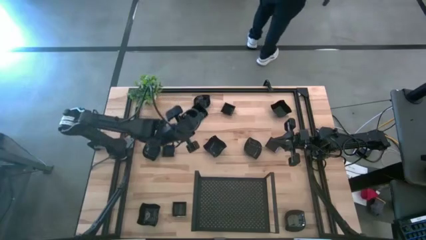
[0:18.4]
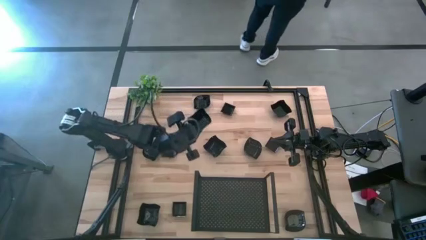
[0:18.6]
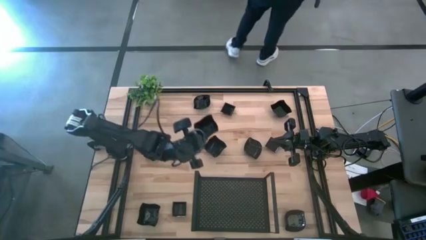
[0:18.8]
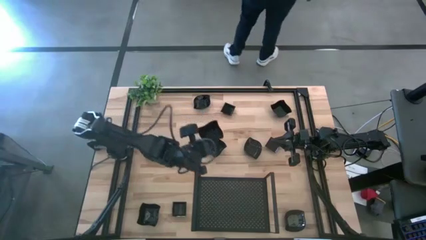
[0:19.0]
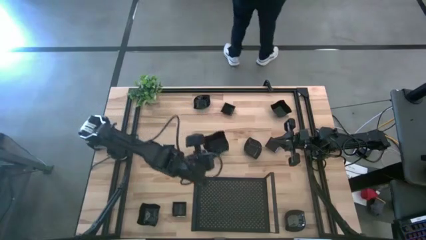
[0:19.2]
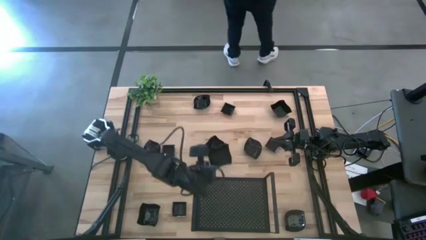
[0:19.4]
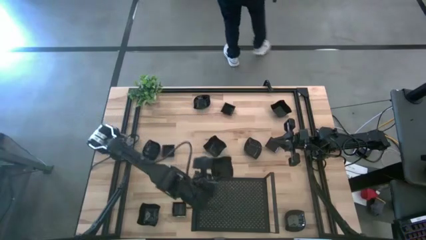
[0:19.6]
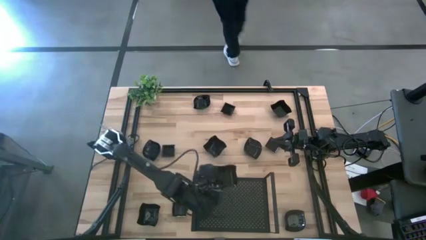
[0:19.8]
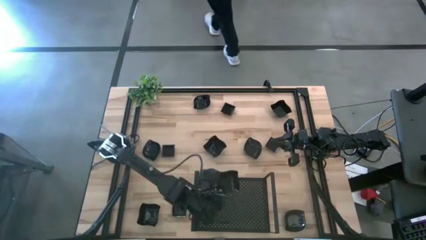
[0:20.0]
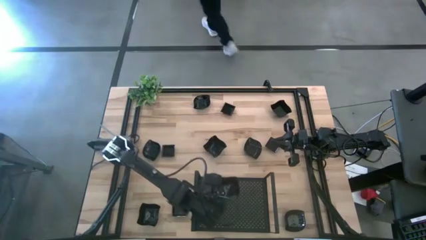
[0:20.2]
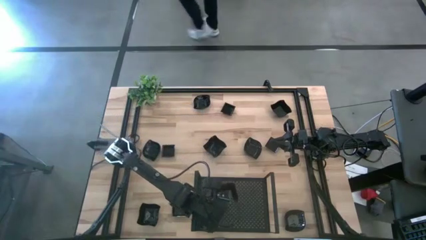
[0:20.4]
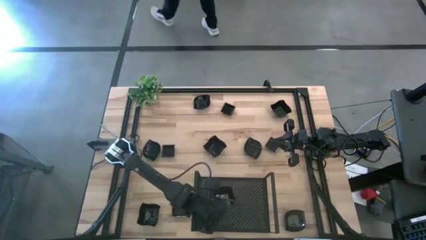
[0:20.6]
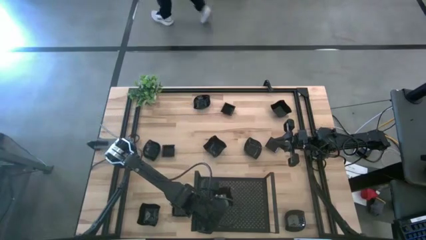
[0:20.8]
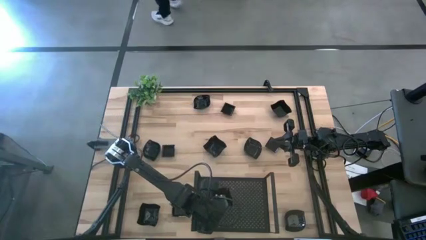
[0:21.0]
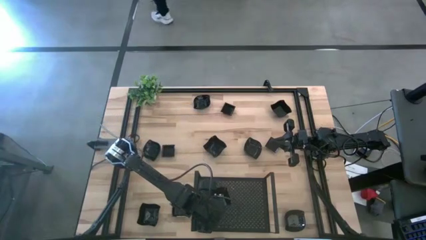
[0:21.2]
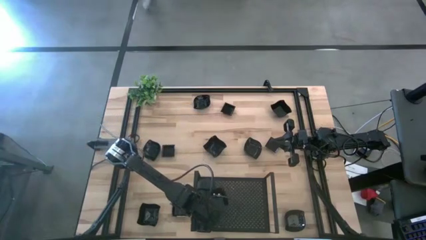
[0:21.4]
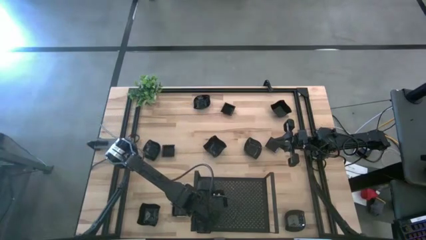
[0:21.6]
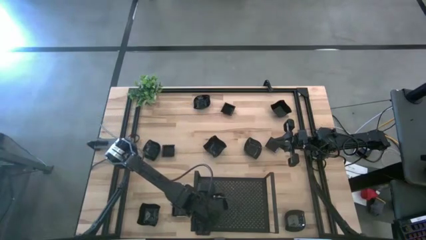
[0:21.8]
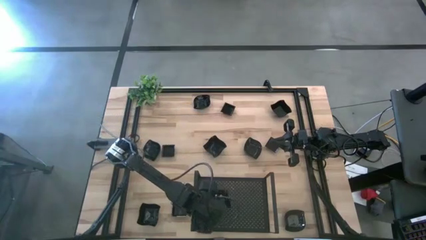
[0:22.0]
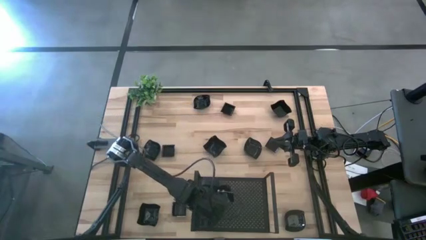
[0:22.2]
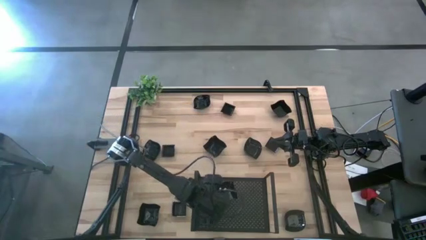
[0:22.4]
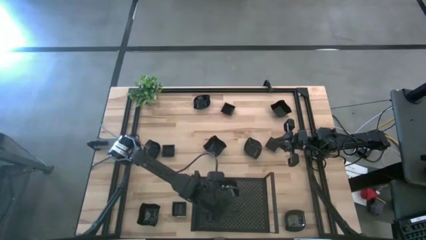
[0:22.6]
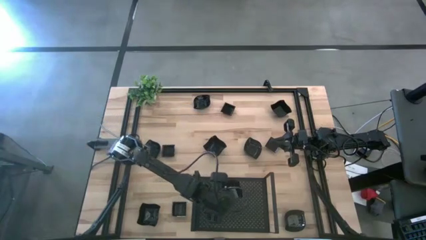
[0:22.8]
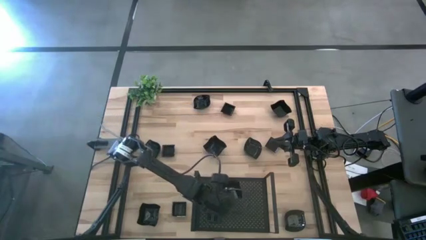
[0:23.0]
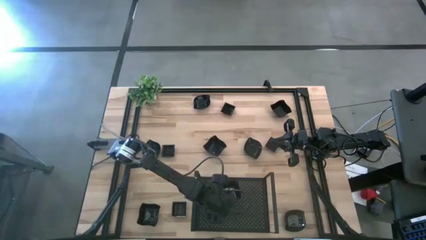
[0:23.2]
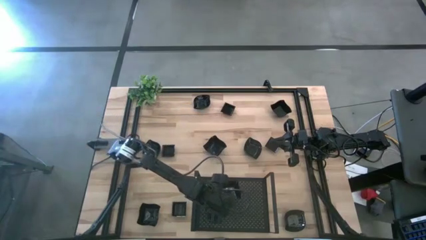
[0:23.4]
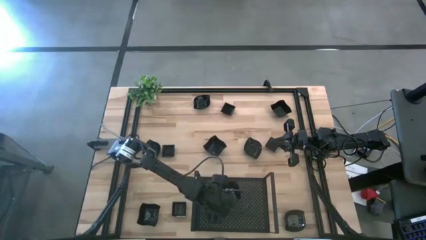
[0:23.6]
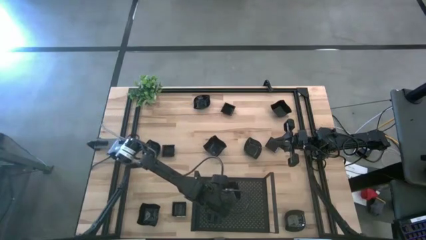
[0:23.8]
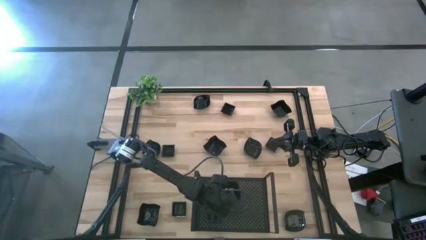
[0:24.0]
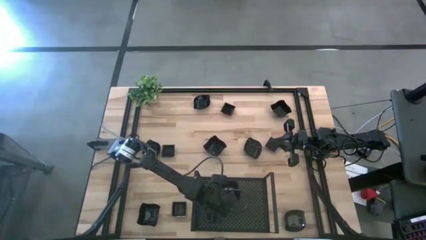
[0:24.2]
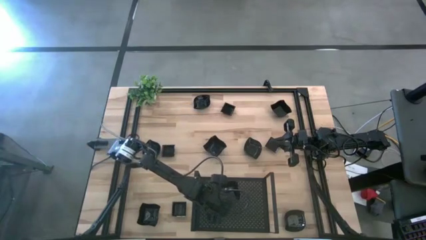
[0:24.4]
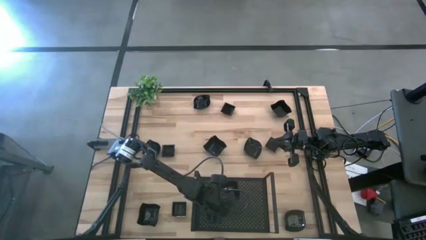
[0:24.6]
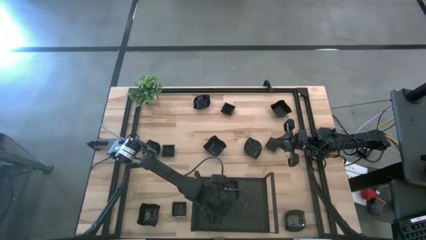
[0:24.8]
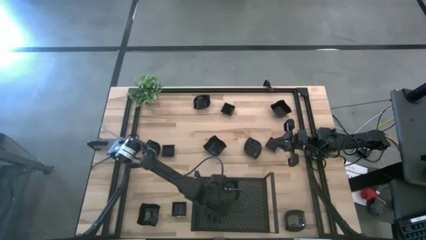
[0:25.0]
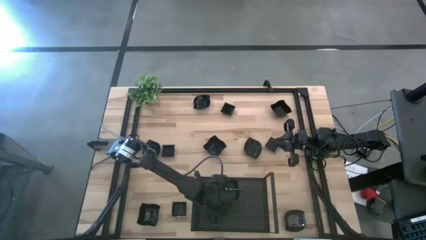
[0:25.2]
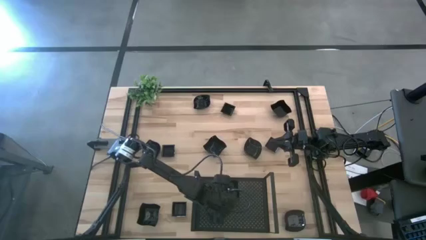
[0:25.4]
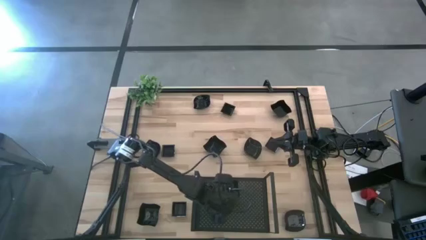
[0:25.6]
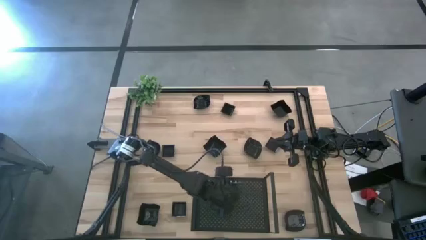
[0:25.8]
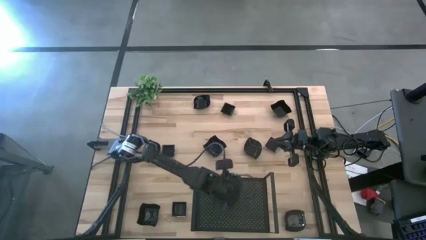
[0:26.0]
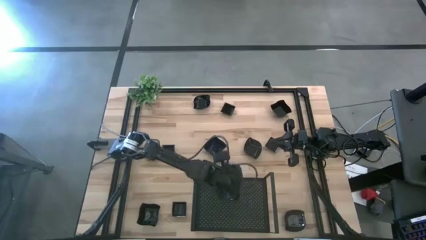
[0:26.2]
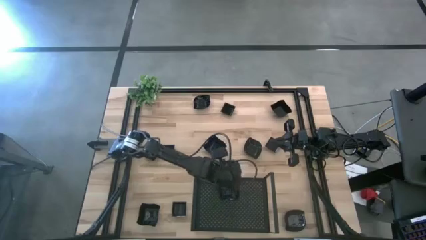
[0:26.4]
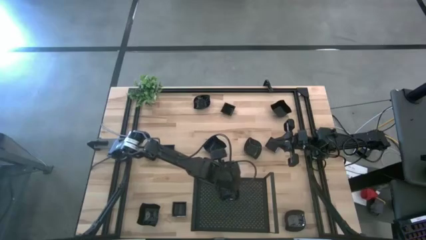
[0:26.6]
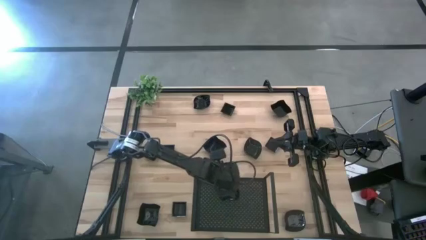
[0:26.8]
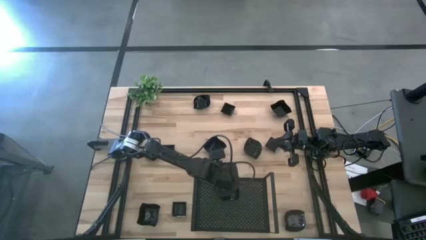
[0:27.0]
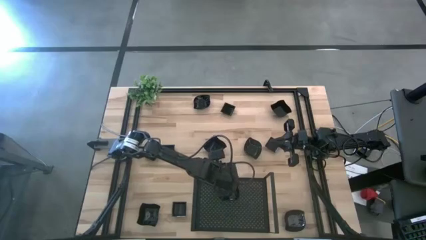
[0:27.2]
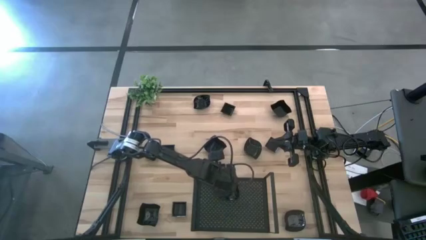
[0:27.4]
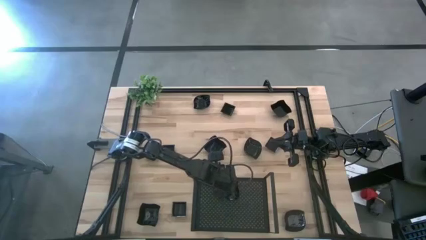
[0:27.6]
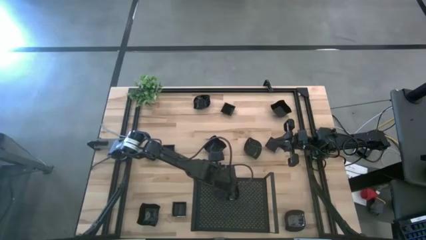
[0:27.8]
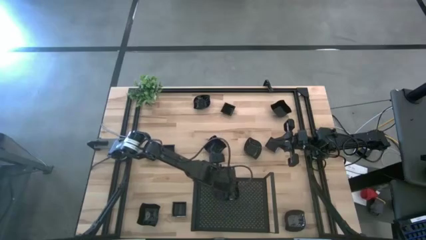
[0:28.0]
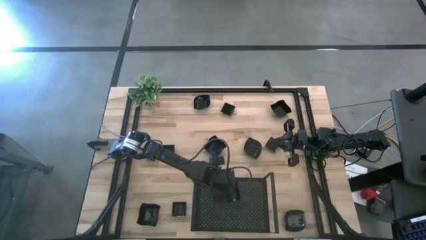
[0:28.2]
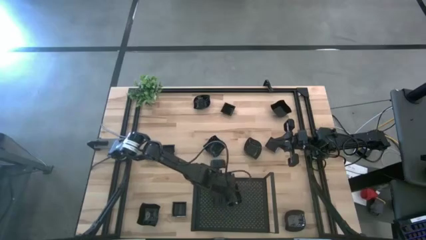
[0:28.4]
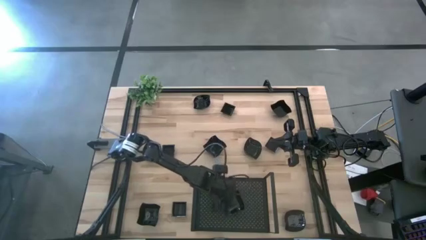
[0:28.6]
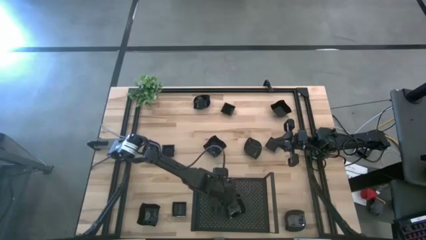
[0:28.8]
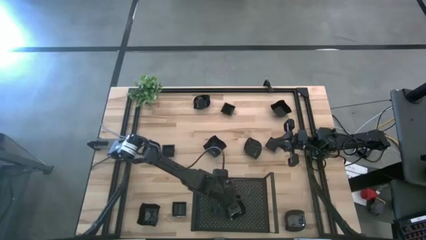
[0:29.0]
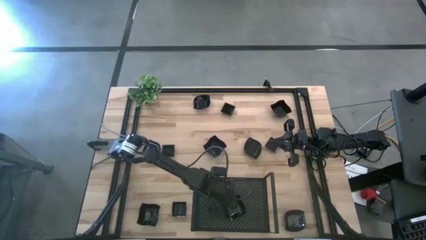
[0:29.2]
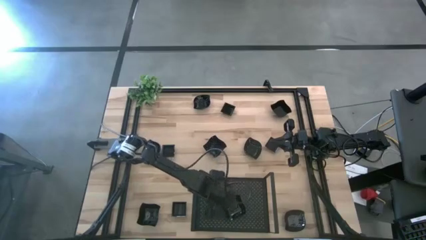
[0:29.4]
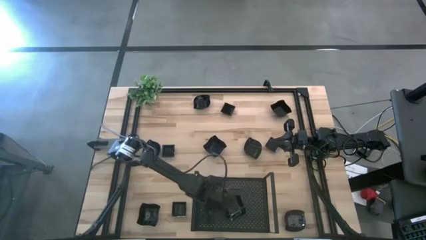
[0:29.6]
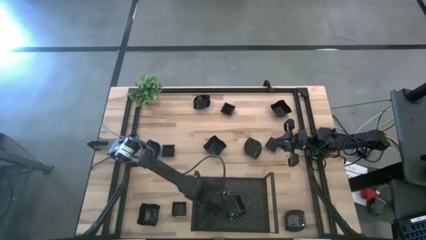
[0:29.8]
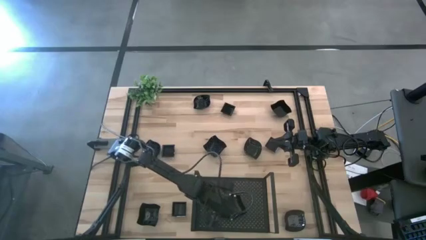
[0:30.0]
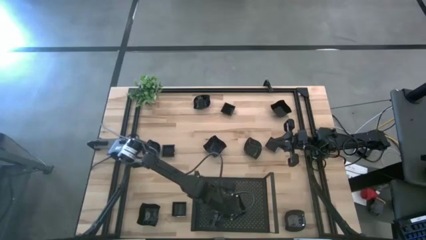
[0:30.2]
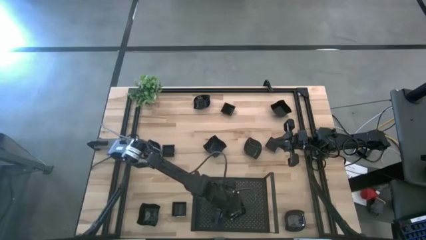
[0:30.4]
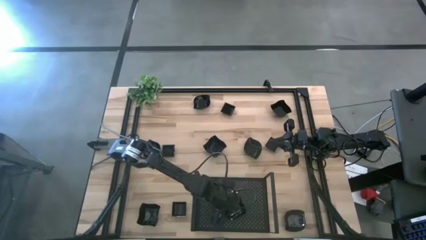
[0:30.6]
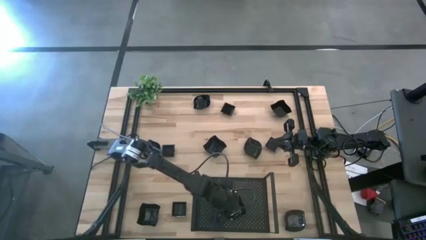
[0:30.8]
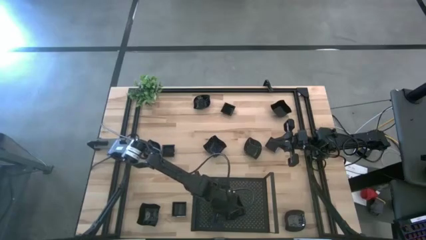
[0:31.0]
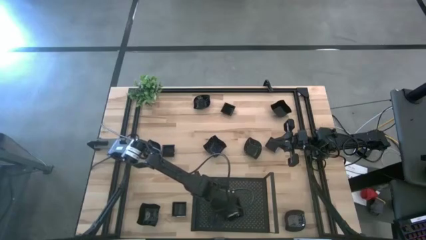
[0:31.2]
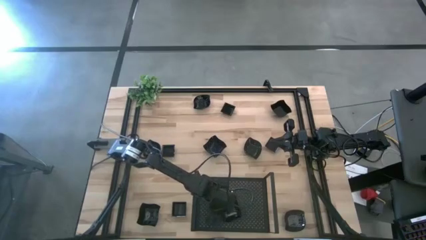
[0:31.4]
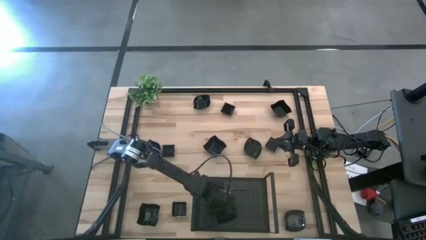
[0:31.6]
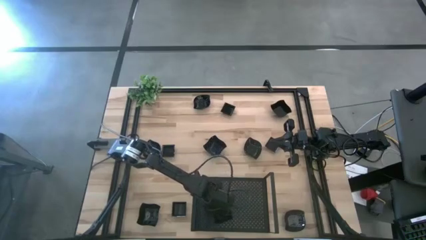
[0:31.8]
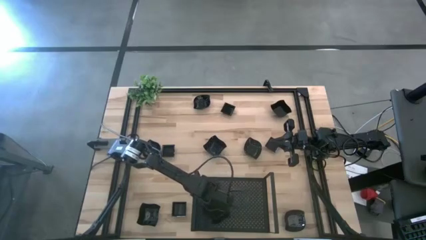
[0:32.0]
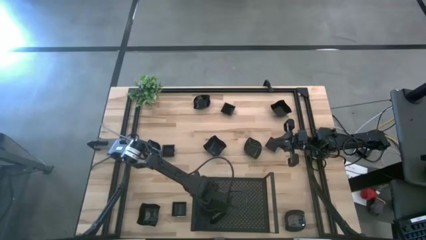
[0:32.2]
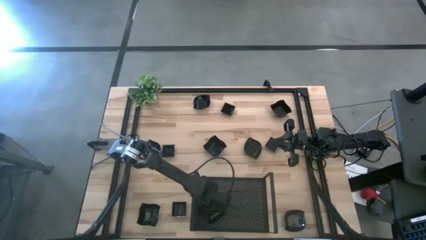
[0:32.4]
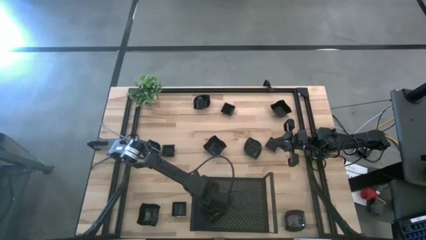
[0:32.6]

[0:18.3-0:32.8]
Task: Pick & Place Mini shaped plates
Put the distorted square plate on the shelf
